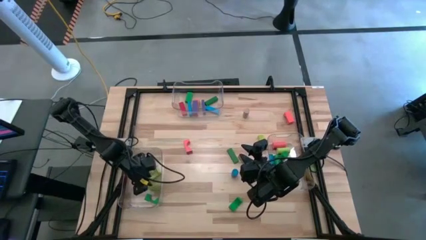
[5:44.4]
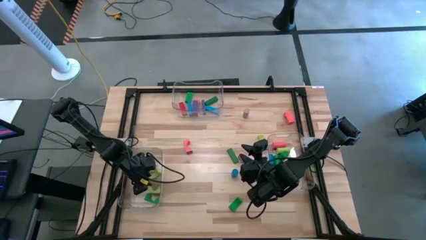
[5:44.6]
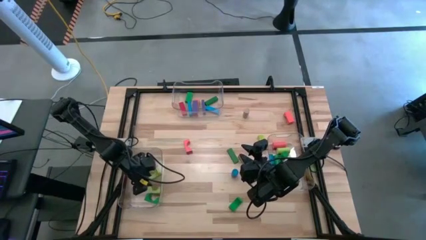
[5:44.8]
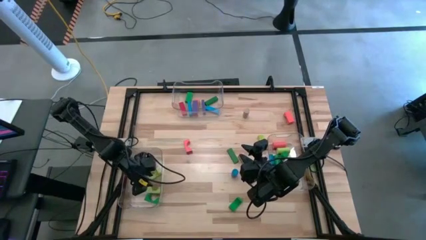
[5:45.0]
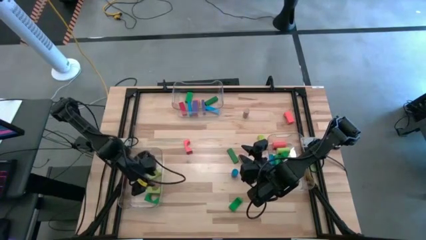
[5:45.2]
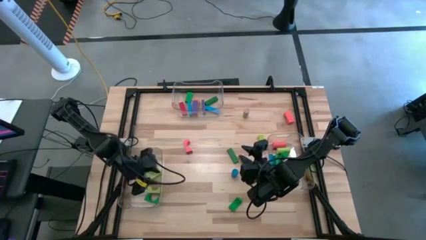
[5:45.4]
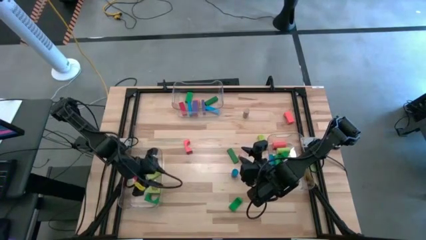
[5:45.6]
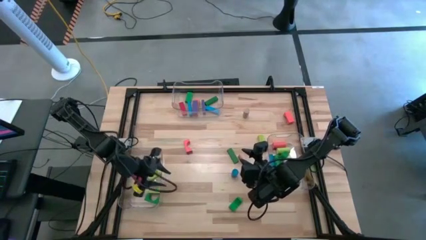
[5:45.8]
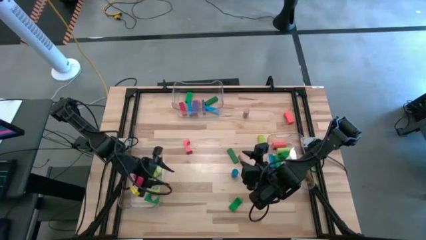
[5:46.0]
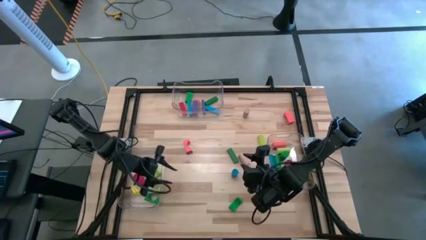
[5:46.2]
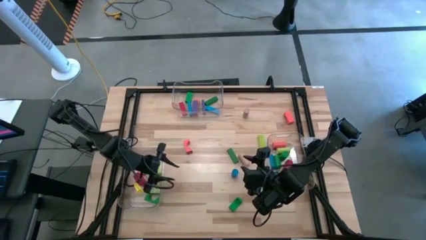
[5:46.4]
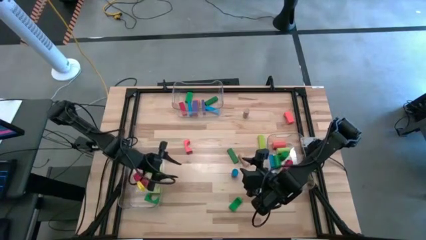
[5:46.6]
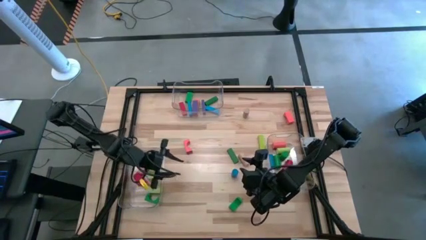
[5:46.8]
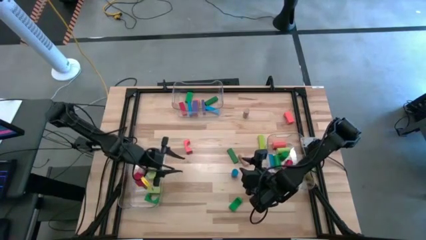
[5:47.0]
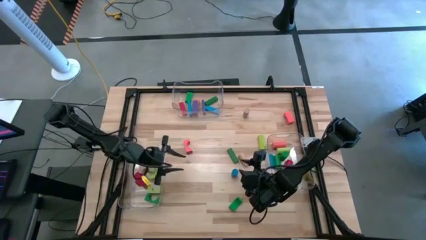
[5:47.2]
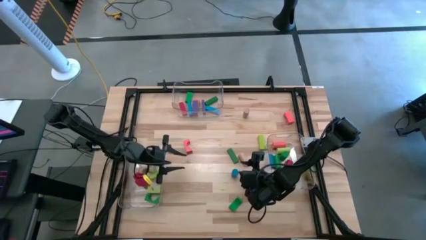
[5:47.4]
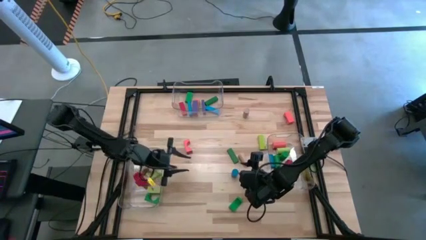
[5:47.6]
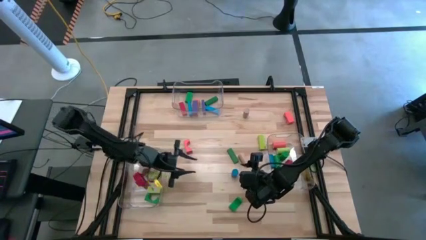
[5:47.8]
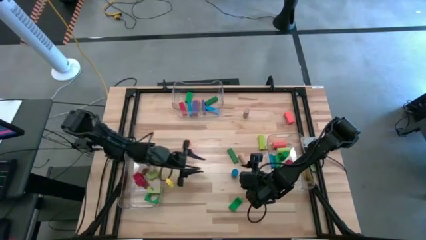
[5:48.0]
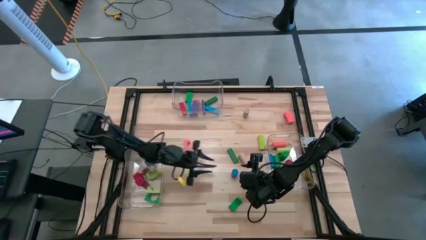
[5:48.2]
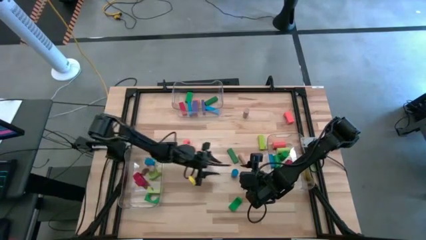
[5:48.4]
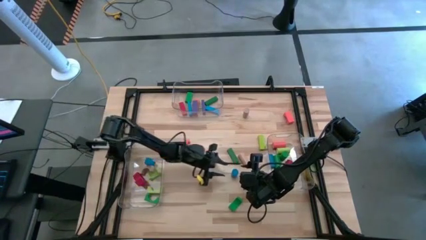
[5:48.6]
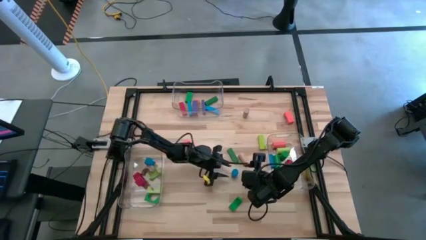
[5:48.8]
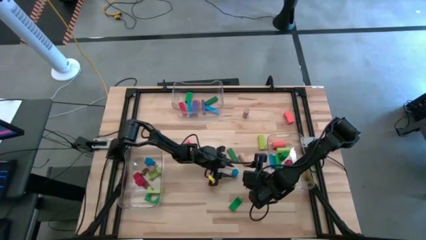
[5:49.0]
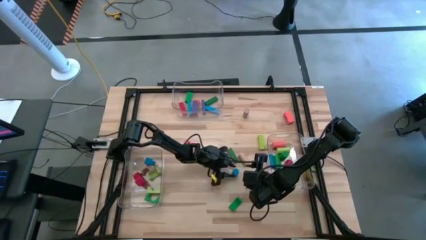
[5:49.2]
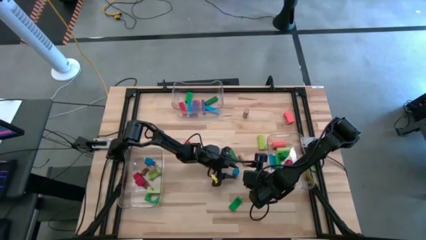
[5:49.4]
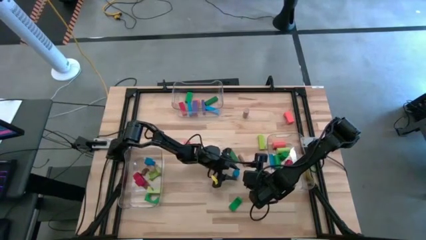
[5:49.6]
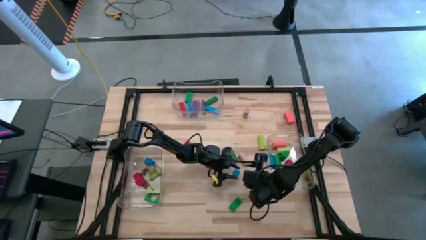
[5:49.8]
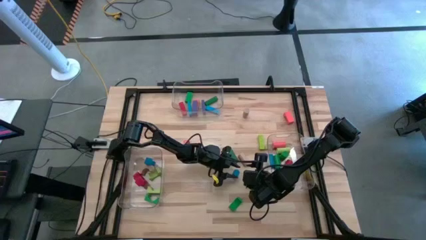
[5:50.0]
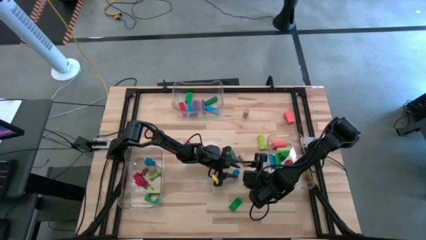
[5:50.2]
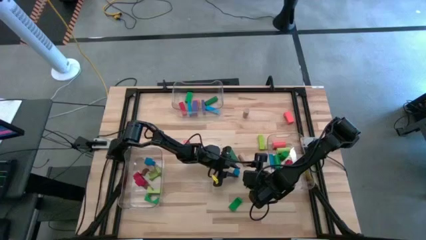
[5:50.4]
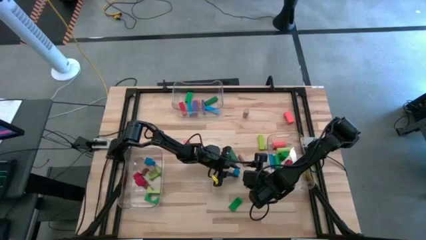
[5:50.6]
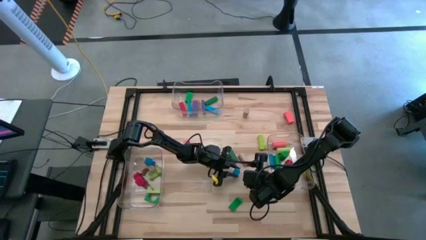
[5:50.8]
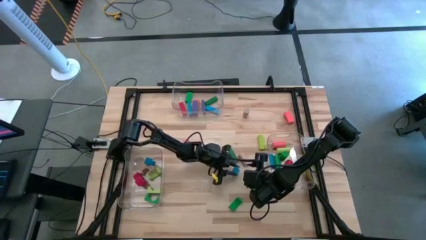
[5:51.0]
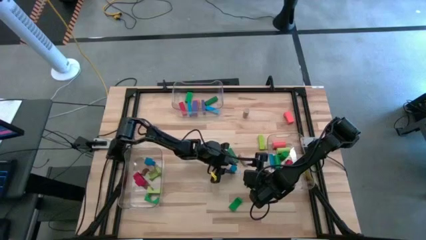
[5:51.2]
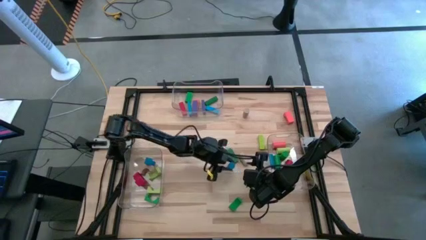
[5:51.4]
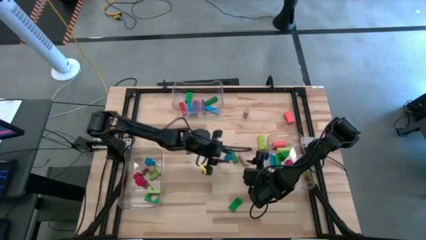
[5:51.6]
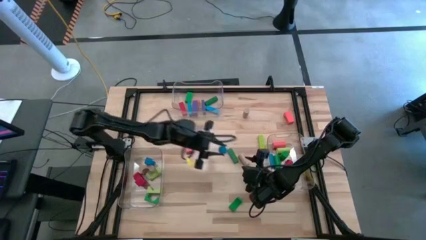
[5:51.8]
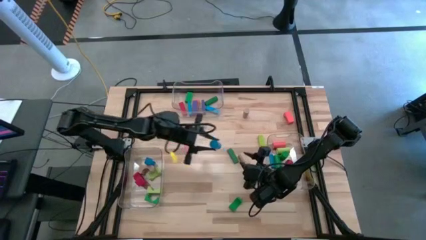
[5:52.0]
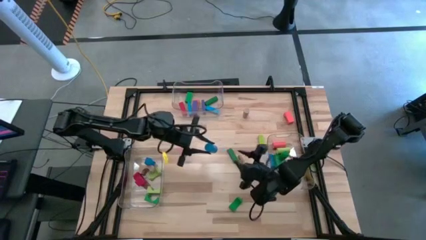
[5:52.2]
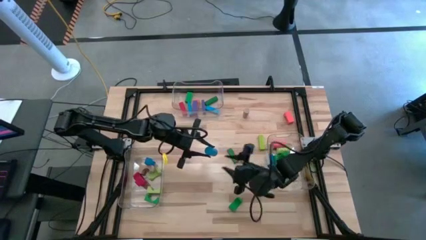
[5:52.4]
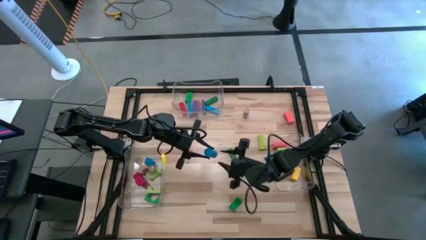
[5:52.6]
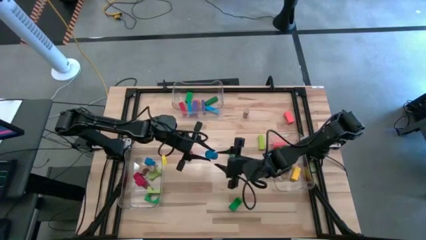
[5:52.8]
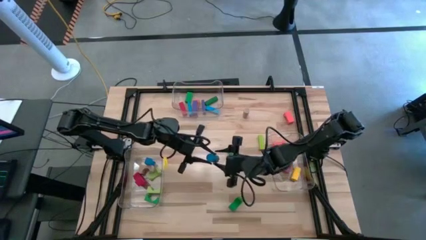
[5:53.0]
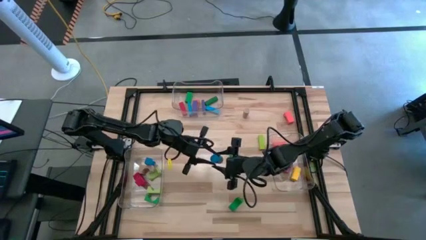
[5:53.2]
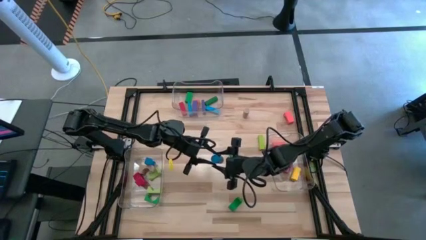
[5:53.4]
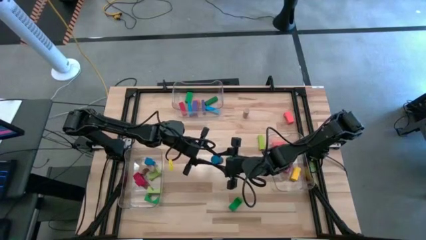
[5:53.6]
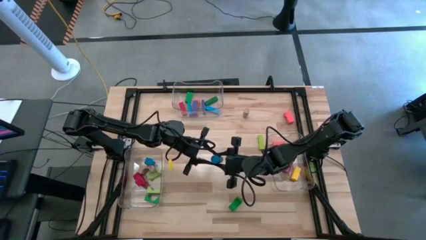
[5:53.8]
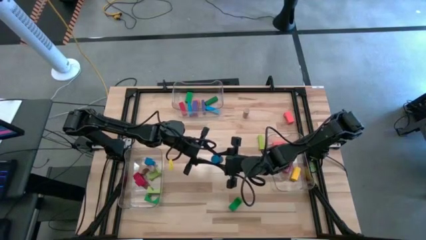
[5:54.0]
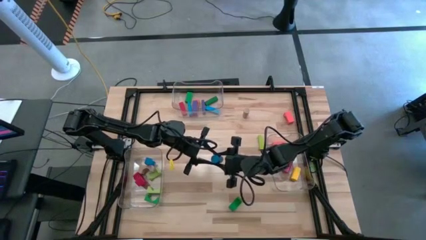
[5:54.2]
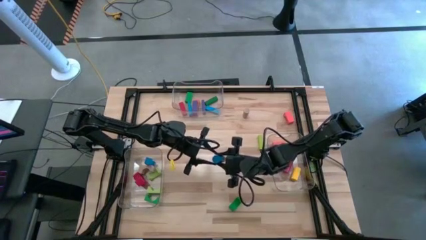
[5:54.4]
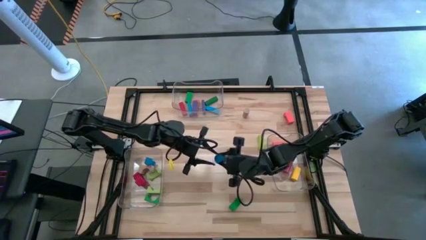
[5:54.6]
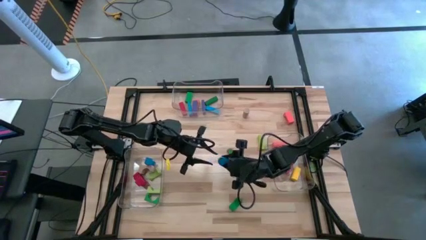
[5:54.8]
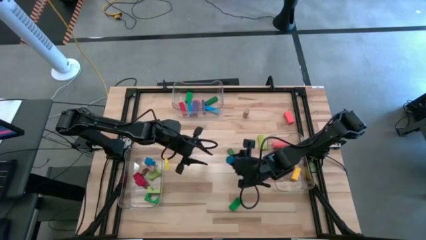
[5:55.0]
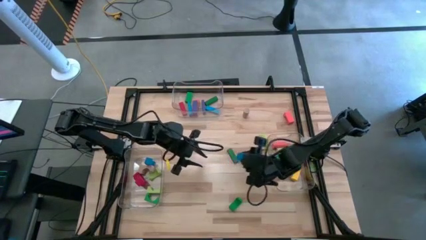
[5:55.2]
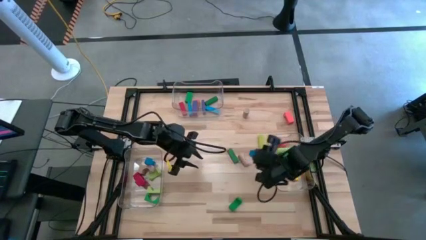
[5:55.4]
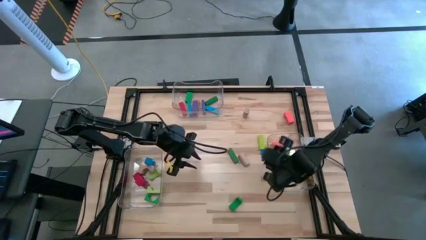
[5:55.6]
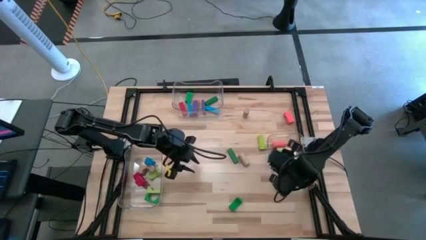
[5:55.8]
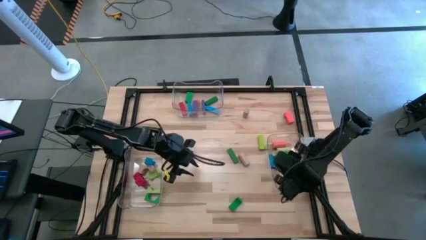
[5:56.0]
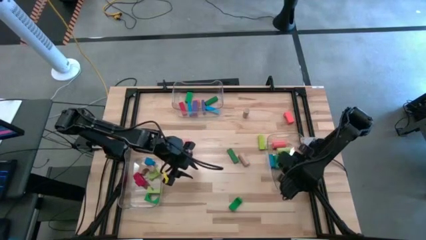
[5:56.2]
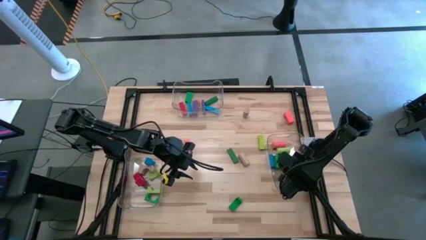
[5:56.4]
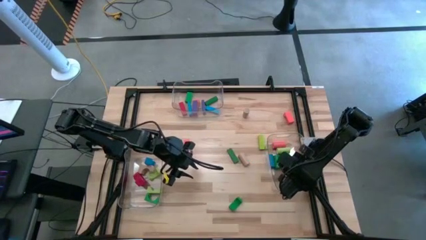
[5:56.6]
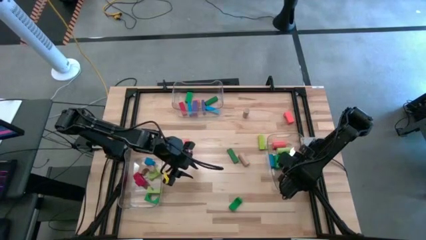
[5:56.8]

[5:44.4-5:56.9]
Task: Sort blocks by size
Put the blue cylindrical block into the right transparent bin
